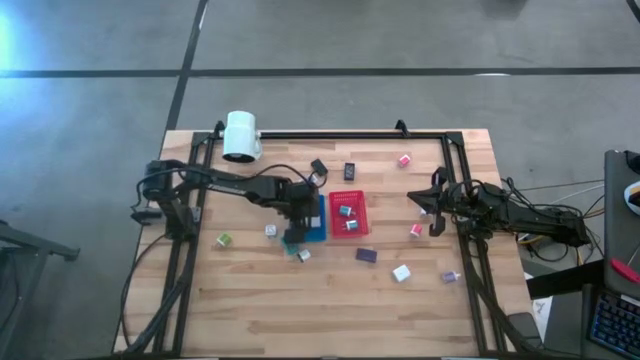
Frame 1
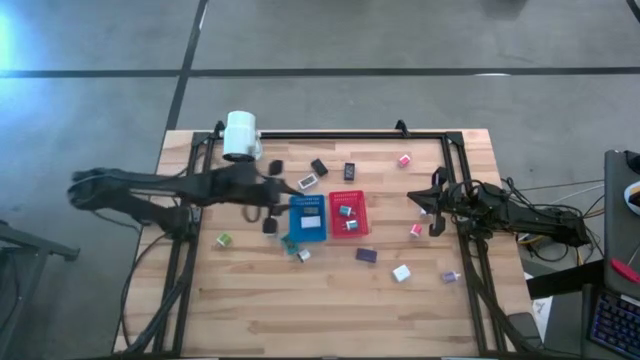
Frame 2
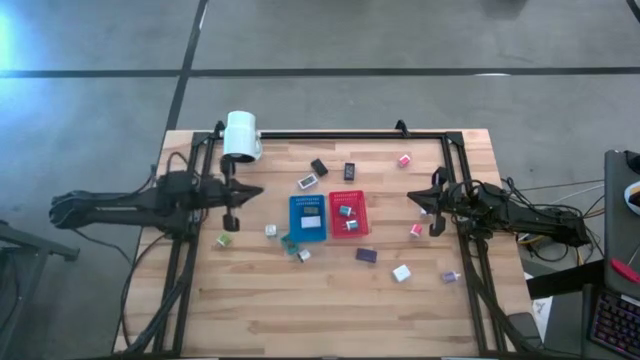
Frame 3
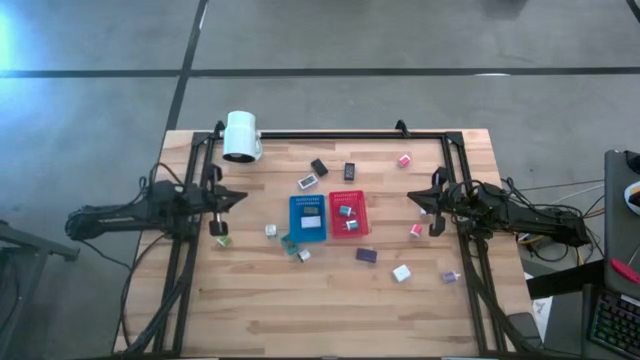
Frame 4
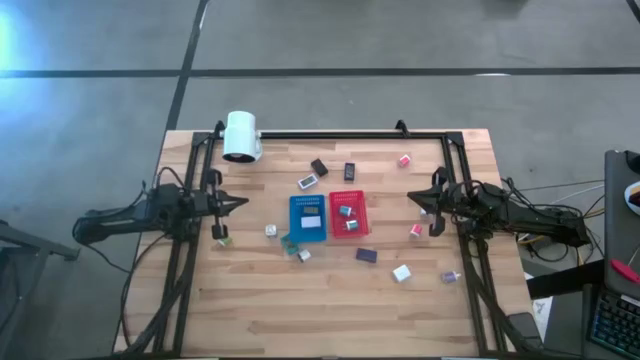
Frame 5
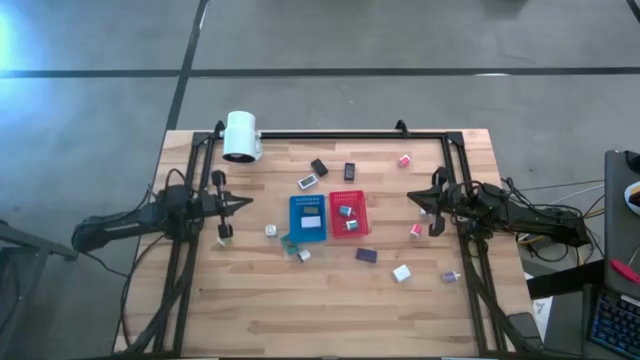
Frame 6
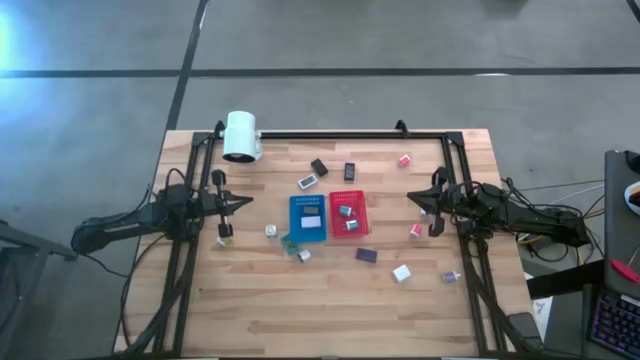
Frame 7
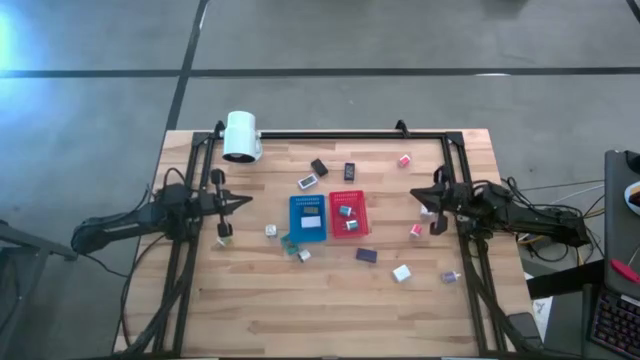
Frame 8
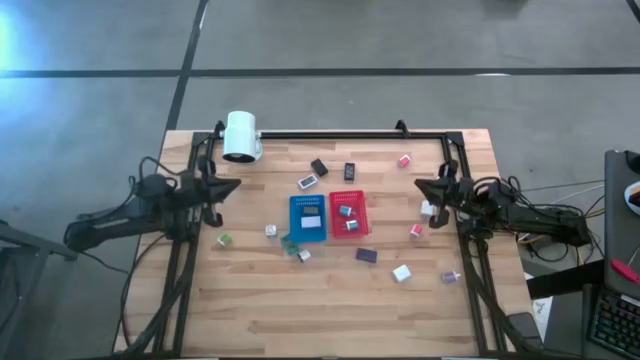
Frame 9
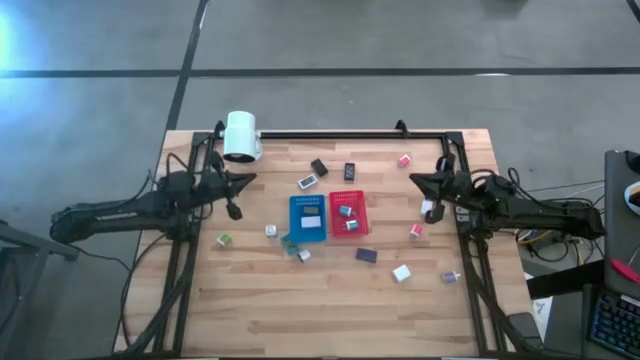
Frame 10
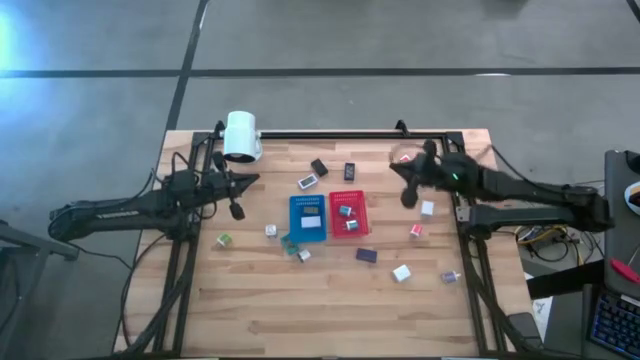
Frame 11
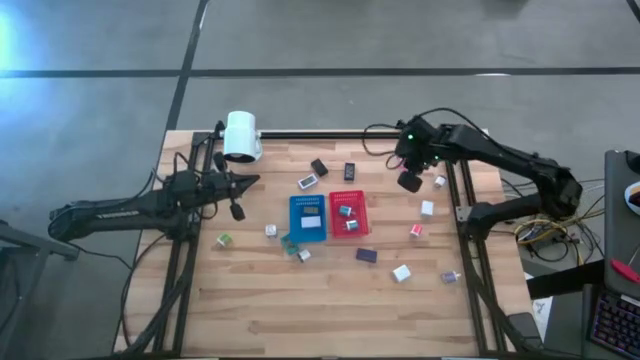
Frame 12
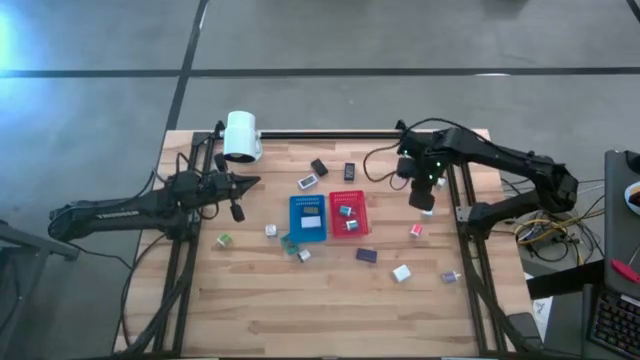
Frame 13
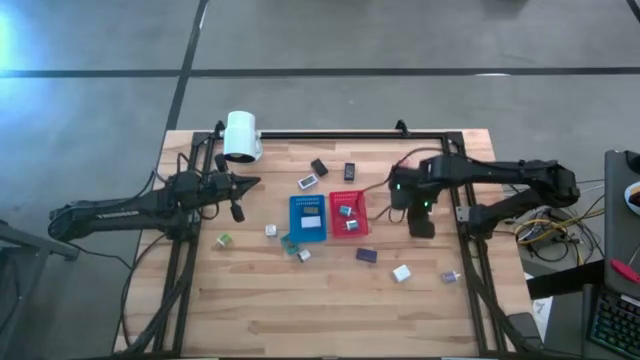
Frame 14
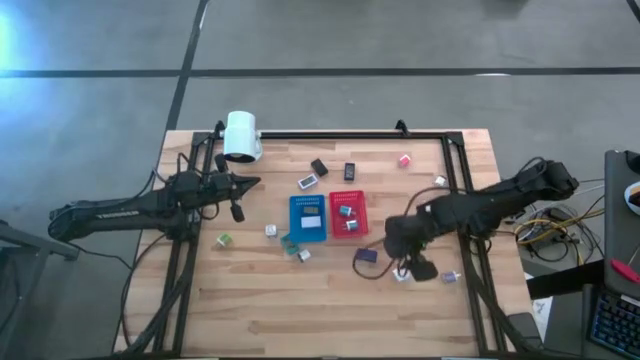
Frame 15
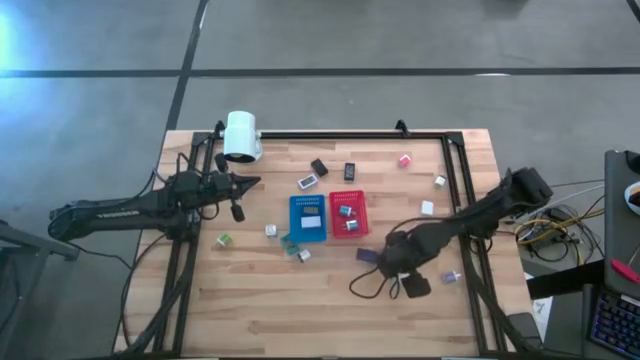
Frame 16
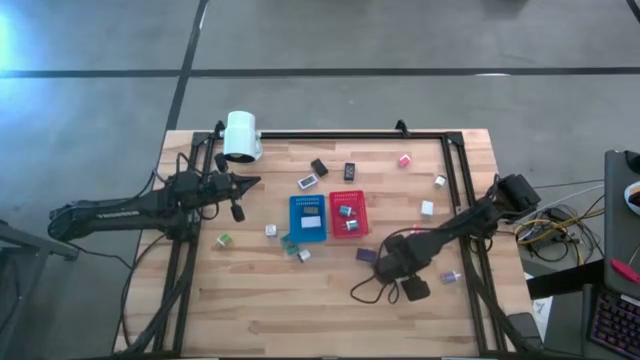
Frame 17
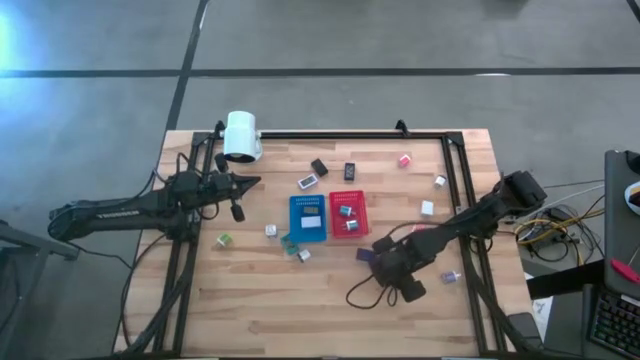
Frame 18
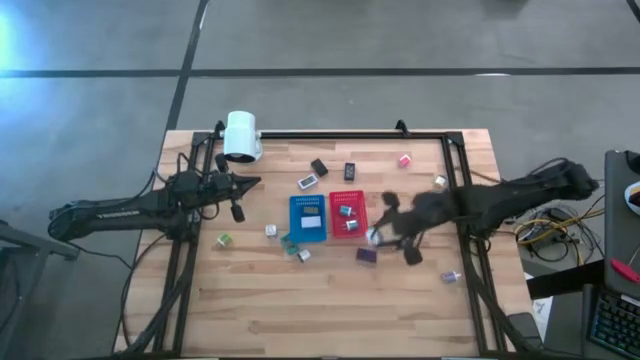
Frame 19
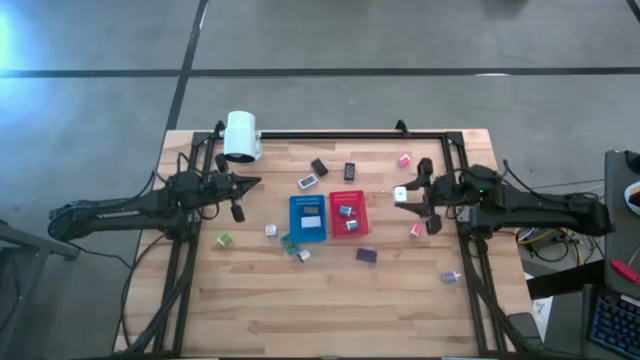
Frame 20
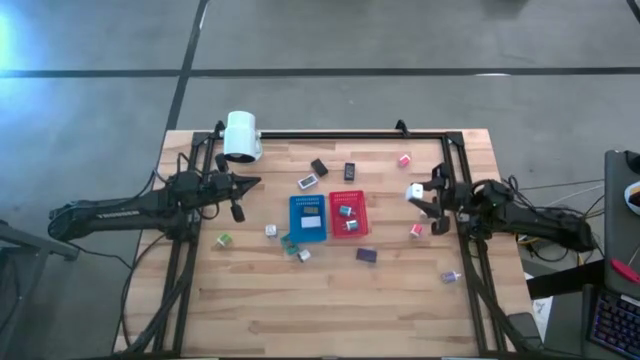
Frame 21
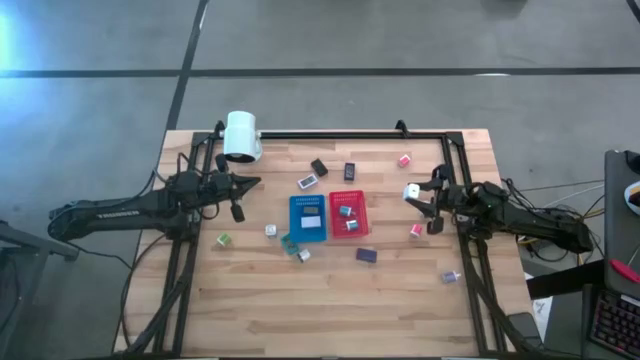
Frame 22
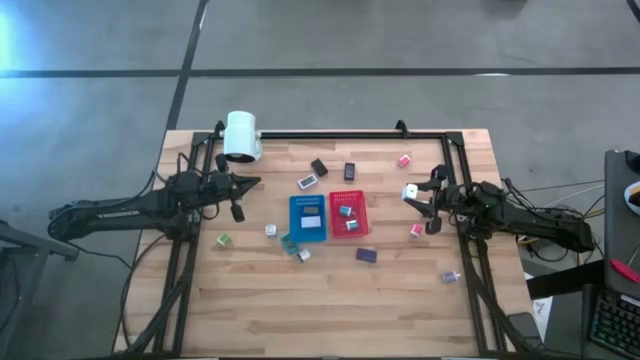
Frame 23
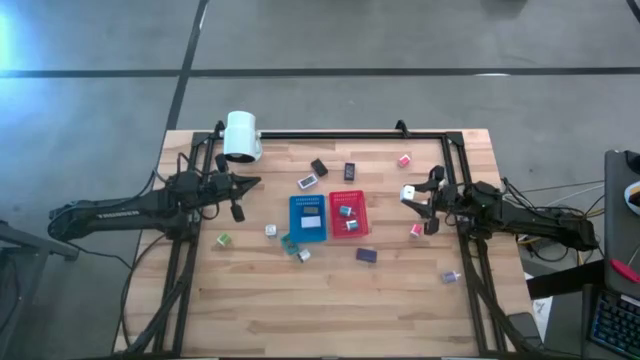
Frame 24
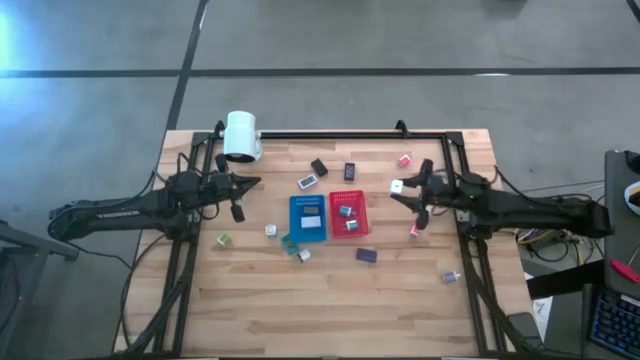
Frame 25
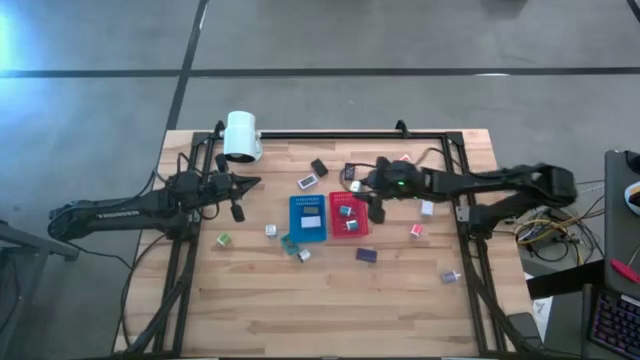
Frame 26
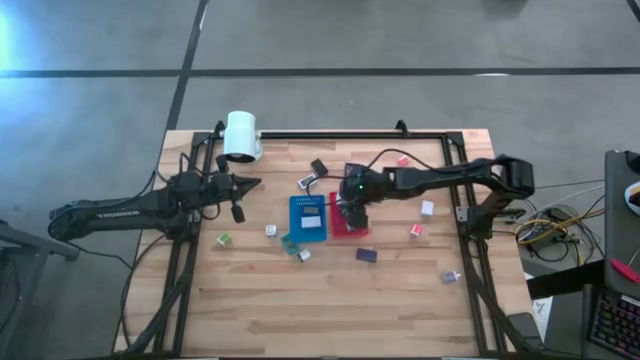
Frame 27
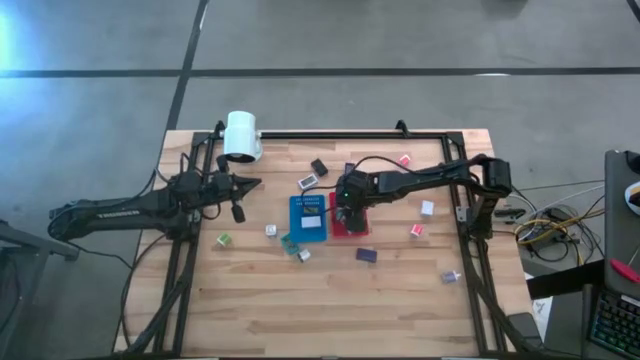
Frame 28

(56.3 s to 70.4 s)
Task: Pick & Place Office items
Put the bottom white adaptor into the red bin

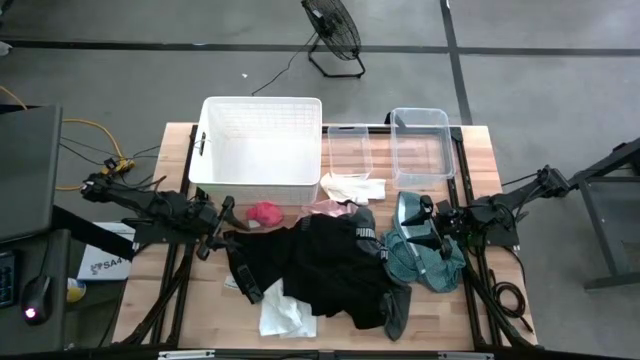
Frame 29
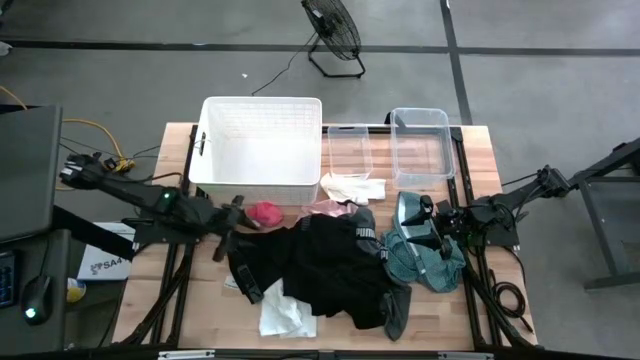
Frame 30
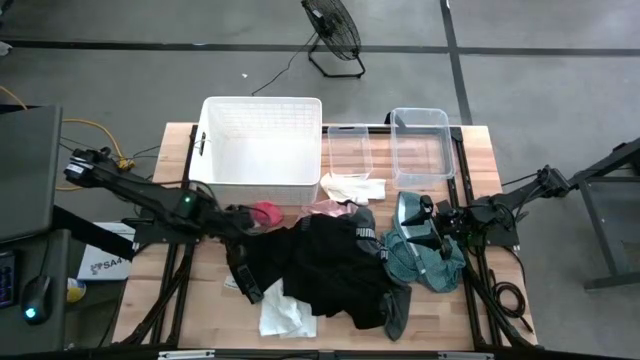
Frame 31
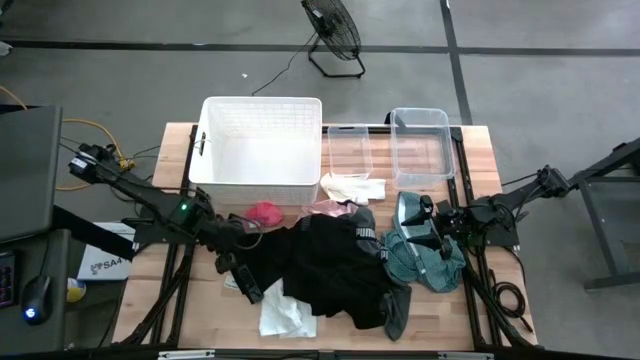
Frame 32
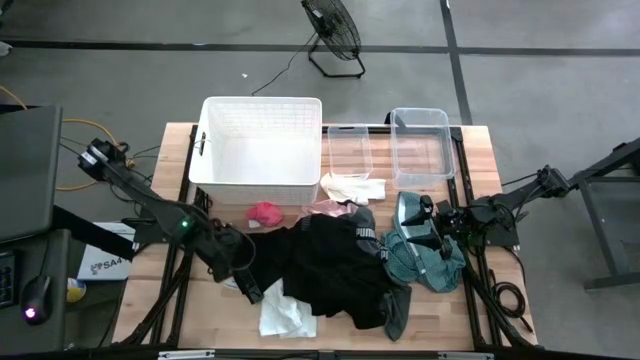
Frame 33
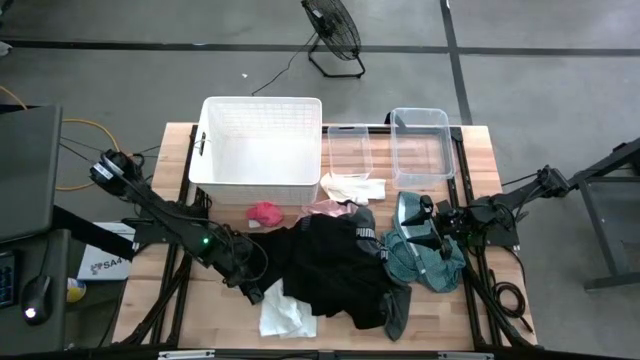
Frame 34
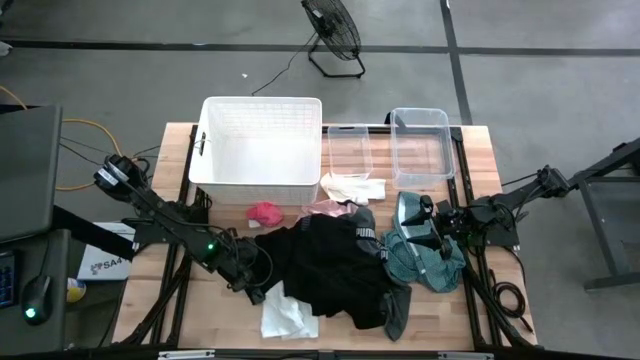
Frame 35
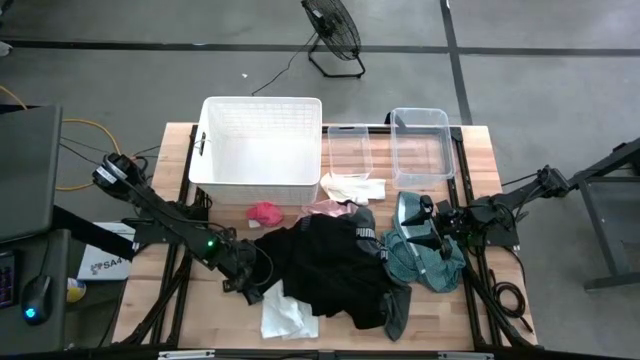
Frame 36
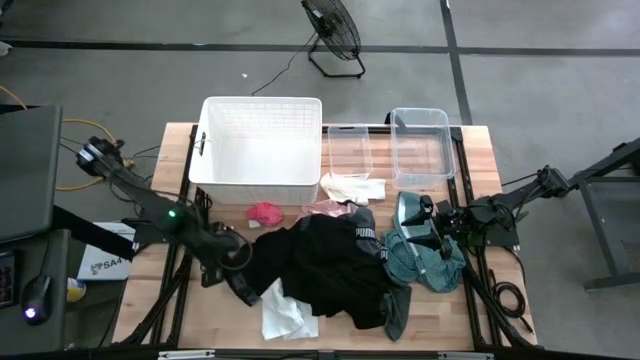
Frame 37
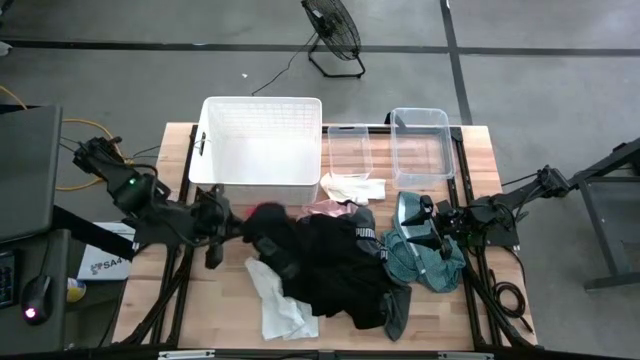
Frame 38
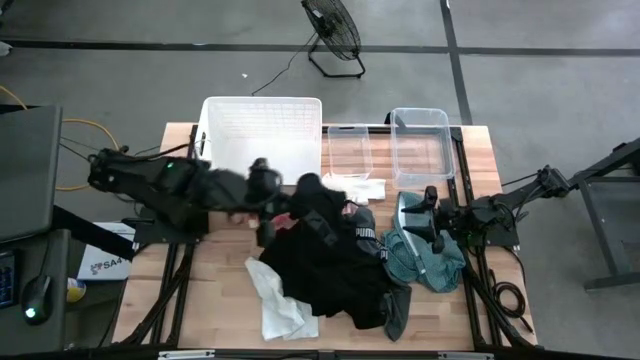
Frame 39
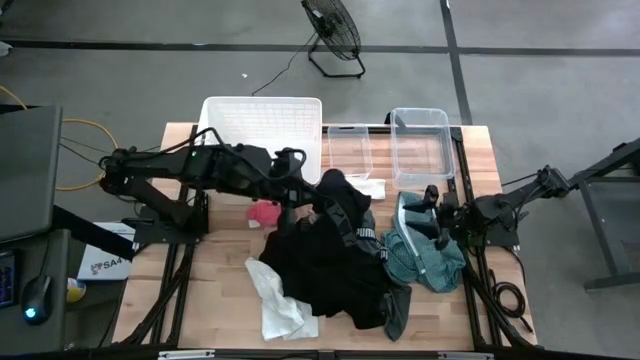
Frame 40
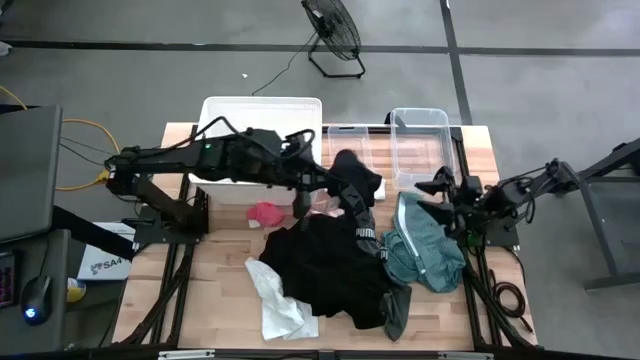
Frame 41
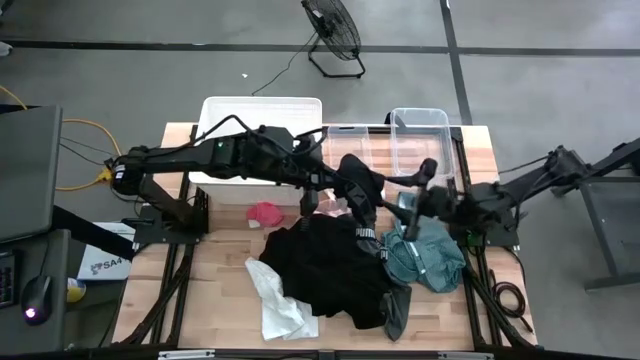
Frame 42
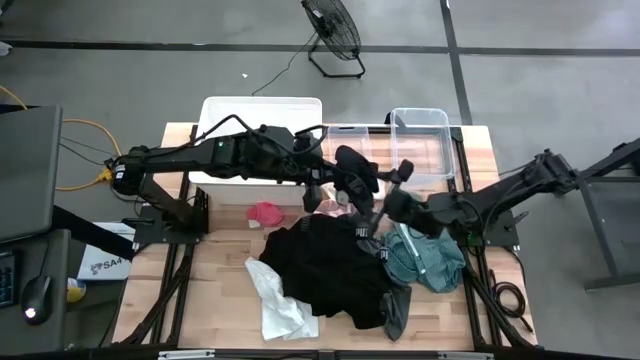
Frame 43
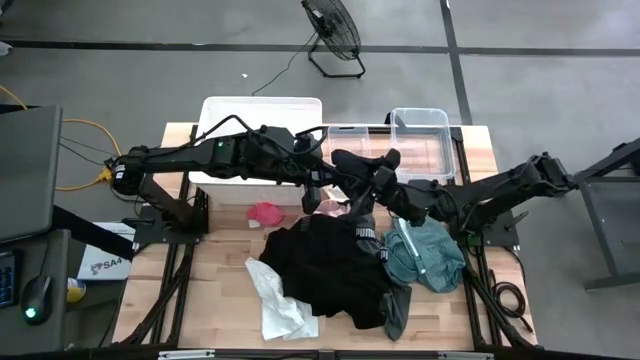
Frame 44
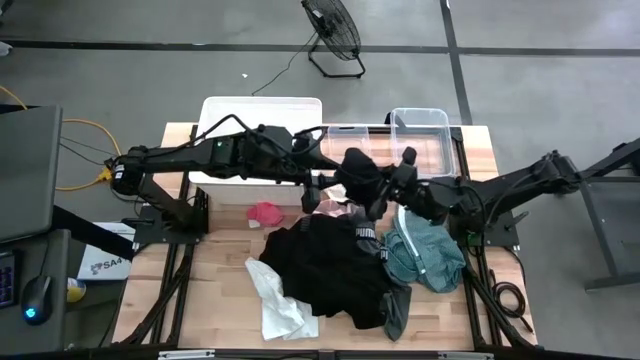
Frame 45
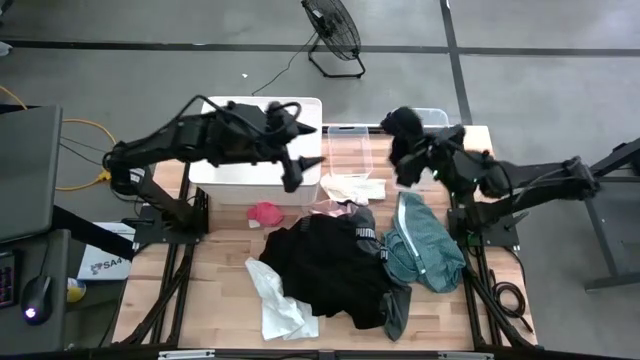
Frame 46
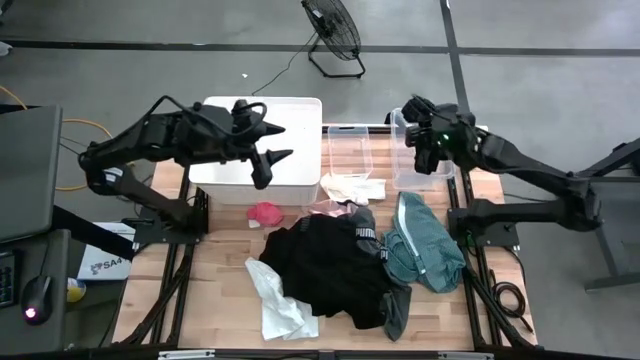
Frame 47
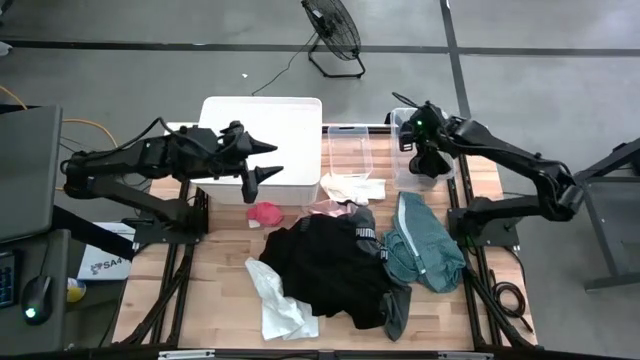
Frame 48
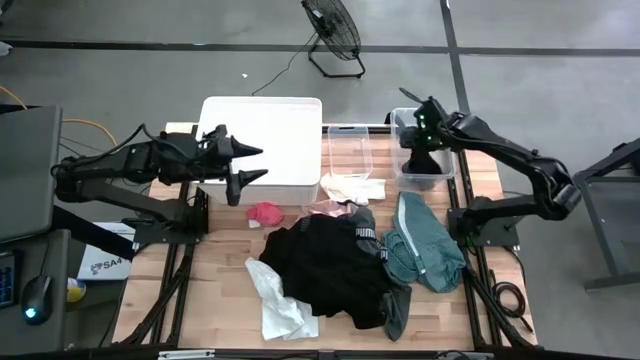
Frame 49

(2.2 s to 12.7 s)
Task: Pick & Place Cloths
Put the left black boxer short into the right transparent bin
